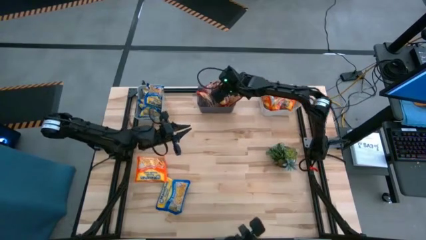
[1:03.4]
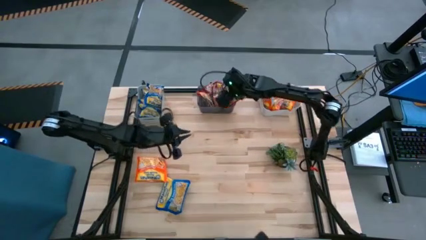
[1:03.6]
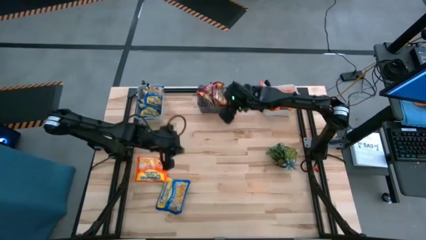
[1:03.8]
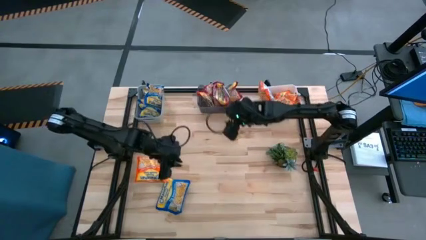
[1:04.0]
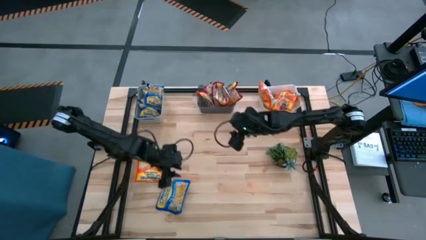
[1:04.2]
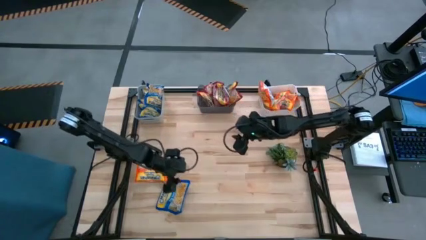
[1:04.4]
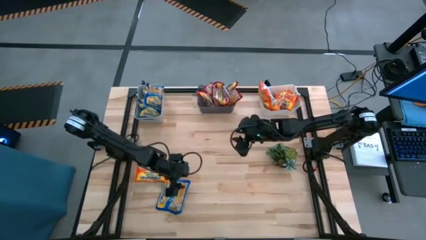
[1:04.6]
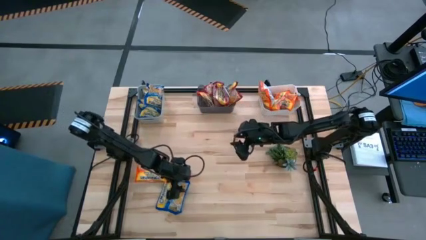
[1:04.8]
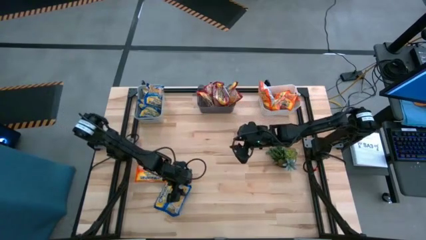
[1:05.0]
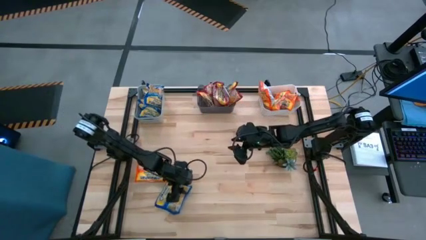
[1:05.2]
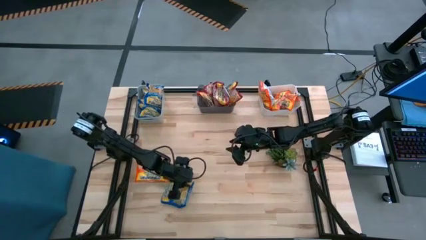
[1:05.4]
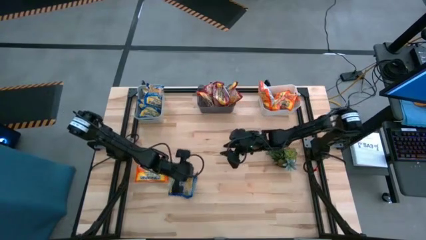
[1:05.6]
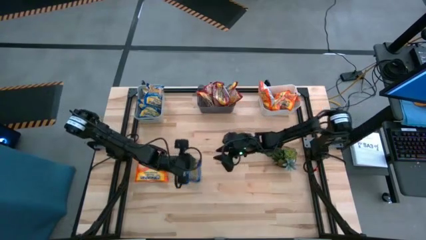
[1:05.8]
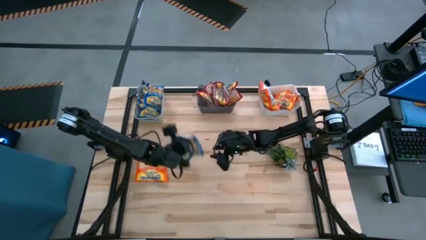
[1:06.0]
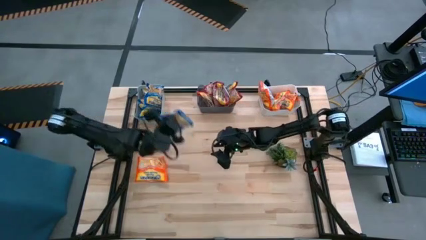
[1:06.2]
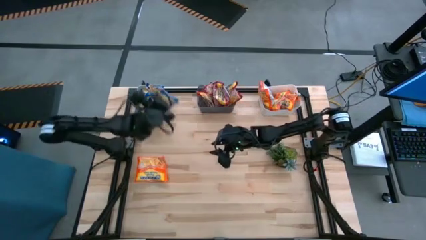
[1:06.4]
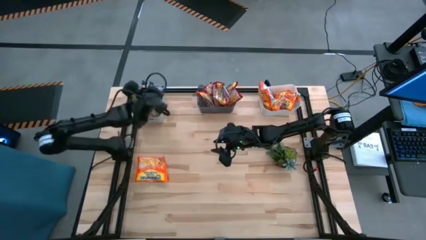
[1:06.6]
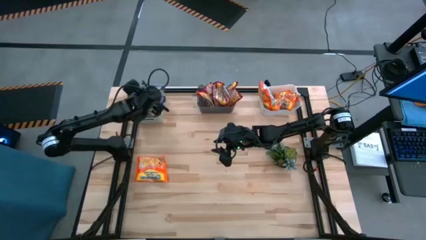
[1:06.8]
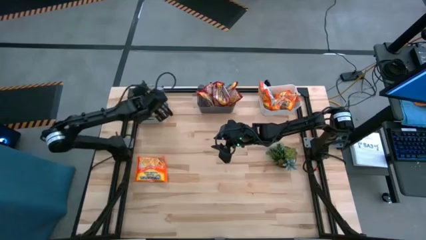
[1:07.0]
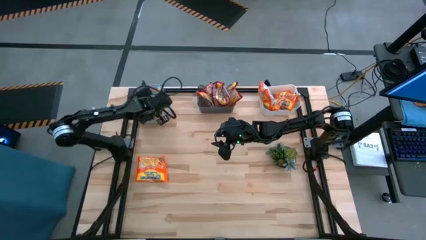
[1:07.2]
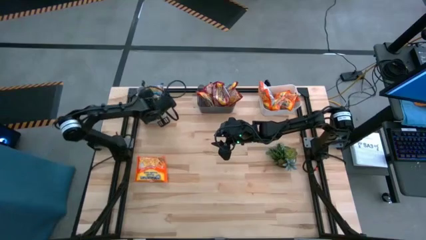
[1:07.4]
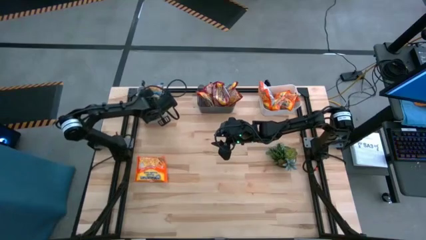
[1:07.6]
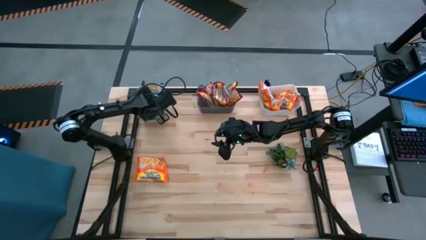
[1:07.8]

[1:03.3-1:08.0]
Task: Sort Maruchan noodles
Put the blue noodle pack into the gray bin

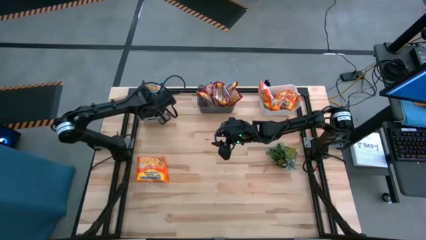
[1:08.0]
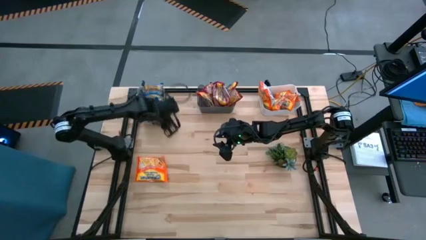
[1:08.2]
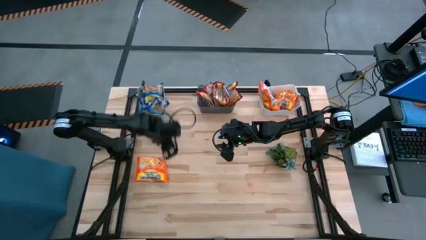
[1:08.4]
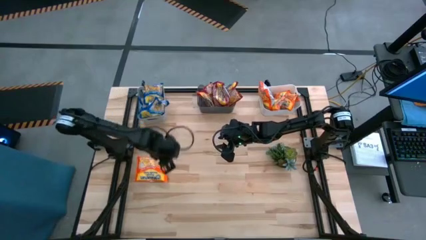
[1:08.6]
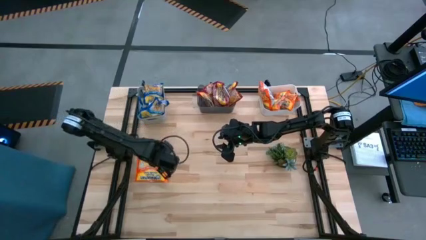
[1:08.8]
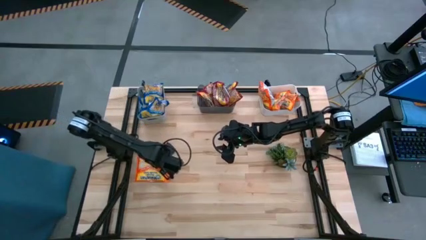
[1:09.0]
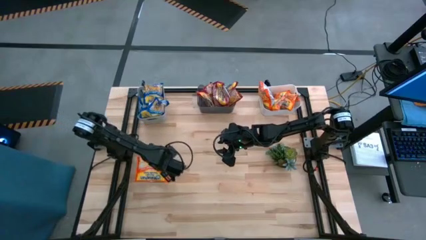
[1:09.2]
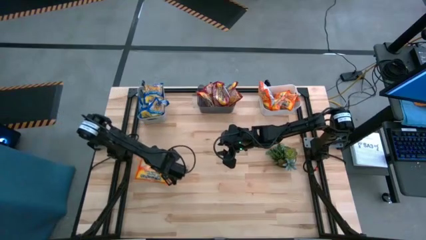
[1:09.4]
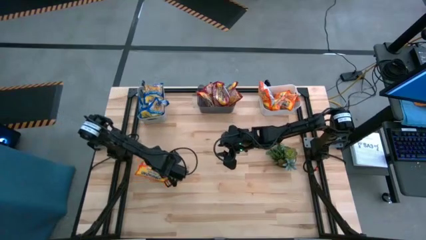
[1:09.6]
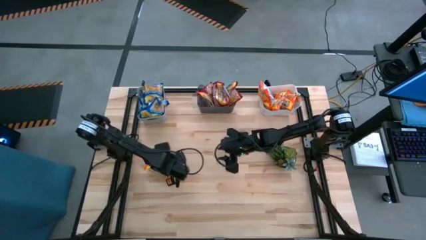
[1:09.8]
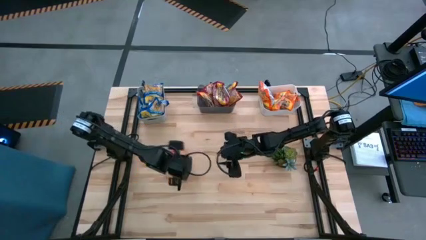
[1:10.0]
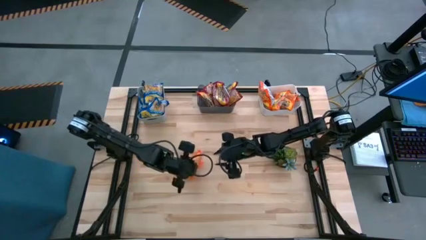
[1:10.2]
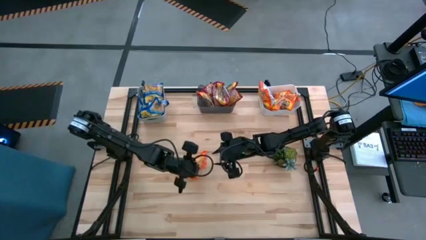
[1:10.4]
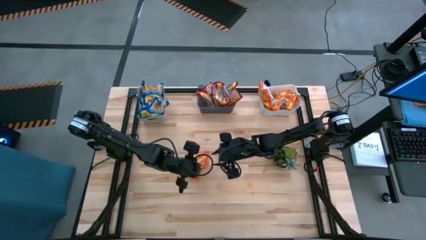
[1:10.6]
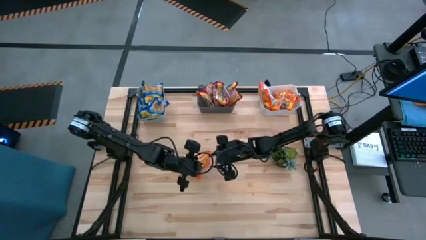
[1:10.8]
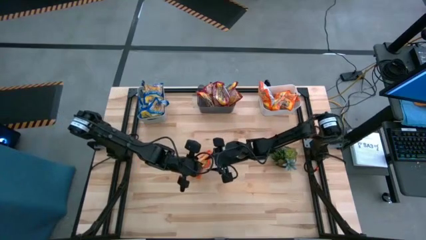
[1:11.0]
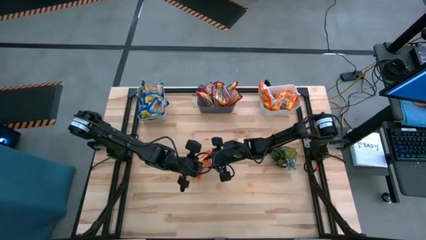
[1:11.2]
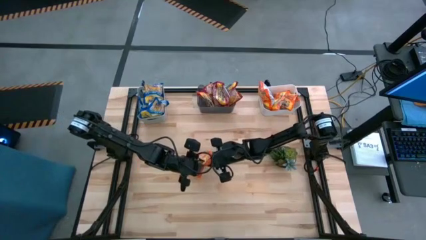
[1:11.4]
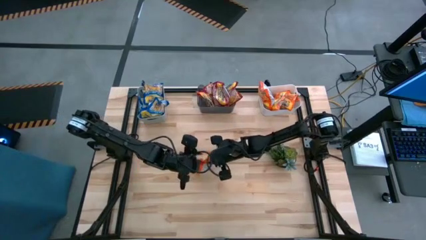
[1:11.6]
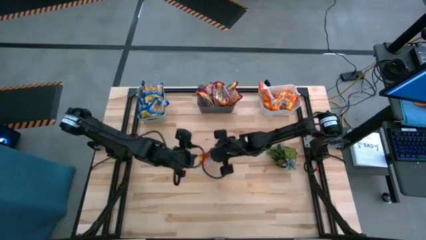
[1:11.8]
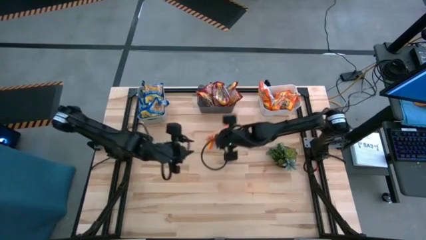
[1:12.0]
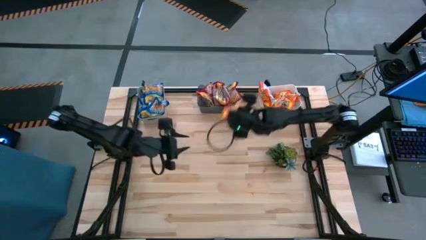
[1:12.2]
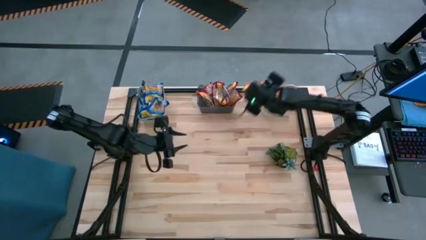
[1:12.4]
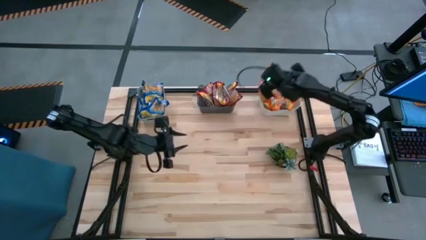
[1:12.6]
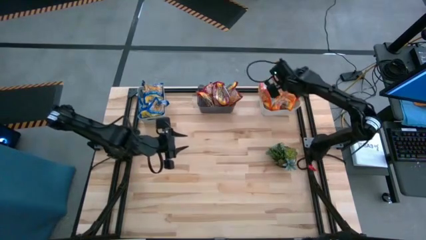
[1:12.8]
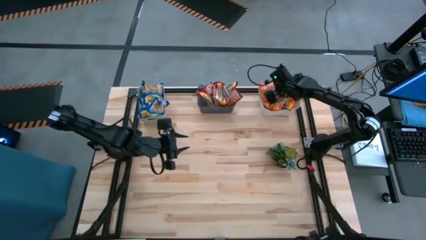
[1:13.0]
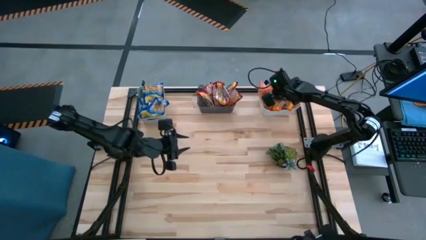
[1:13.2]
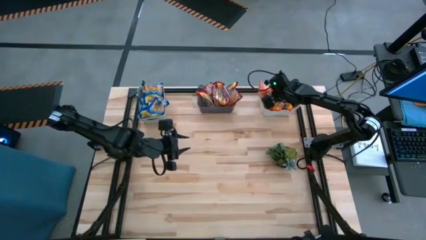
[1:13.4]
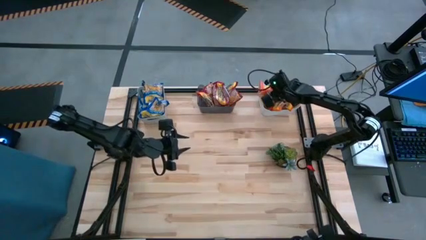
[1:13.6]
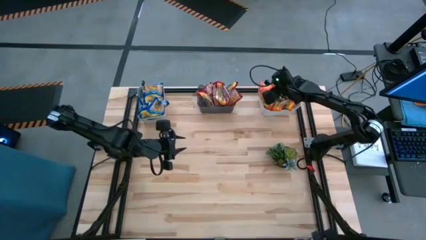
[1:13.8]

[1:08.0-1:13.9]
Put the orange noodle pack into the white bin

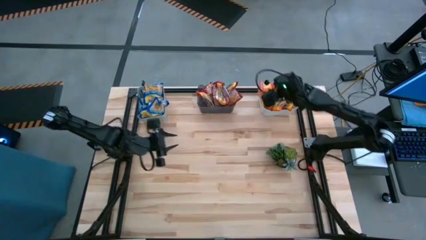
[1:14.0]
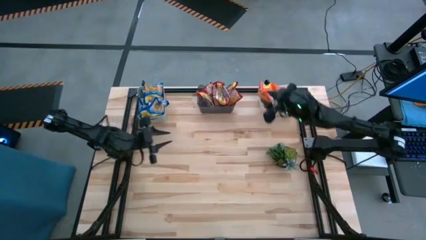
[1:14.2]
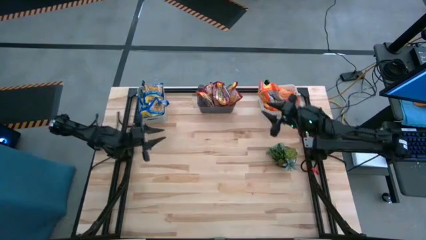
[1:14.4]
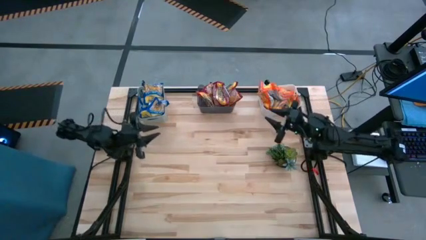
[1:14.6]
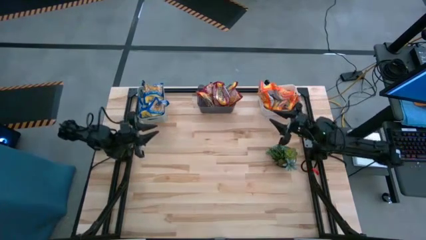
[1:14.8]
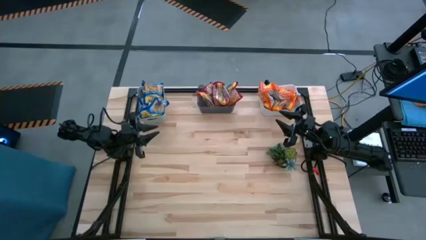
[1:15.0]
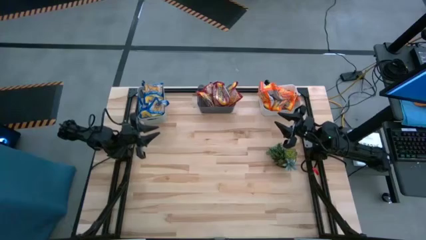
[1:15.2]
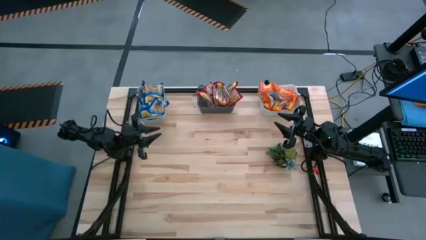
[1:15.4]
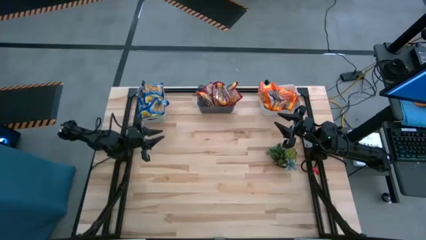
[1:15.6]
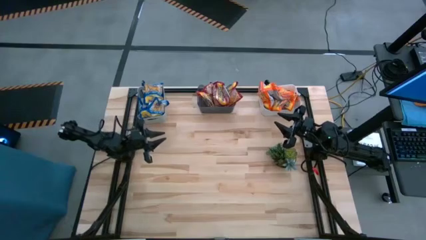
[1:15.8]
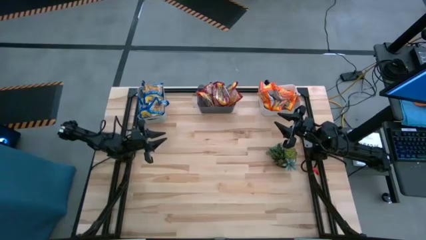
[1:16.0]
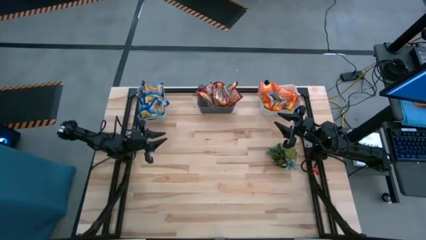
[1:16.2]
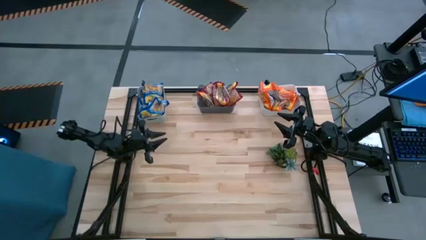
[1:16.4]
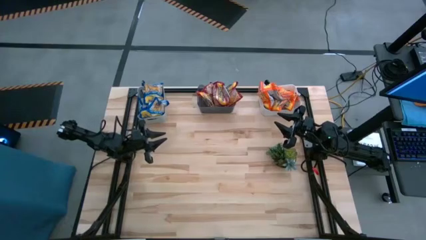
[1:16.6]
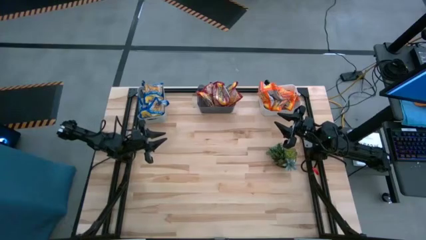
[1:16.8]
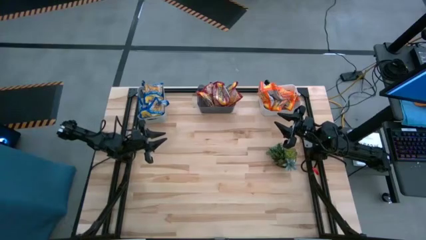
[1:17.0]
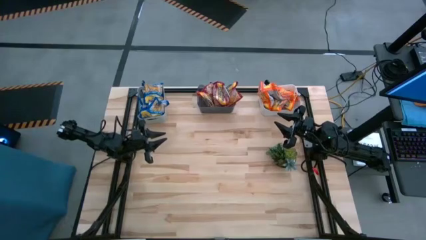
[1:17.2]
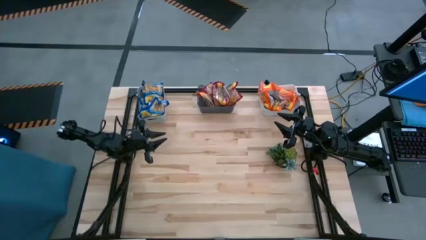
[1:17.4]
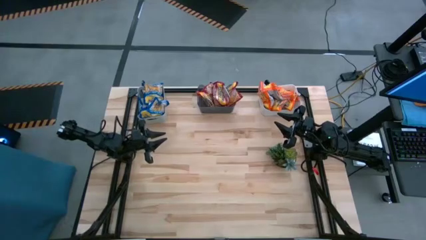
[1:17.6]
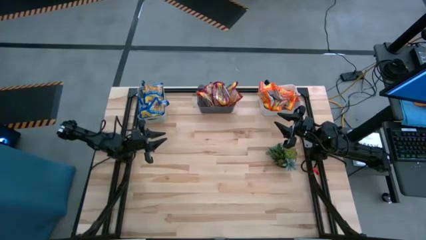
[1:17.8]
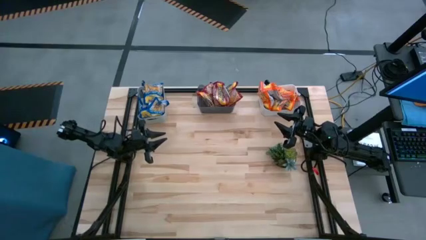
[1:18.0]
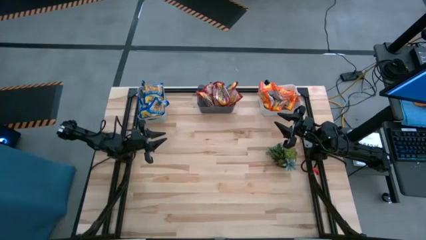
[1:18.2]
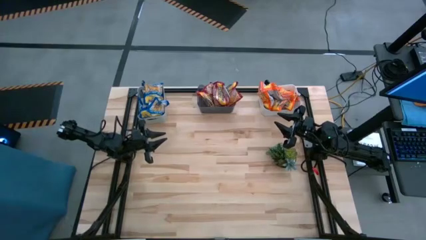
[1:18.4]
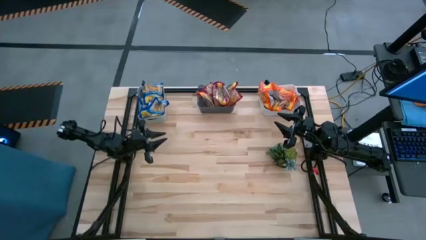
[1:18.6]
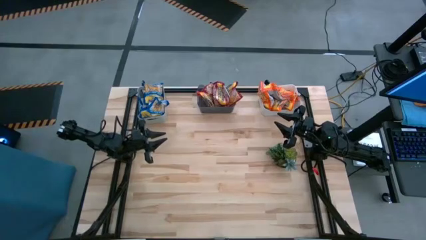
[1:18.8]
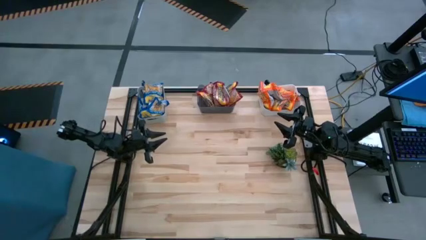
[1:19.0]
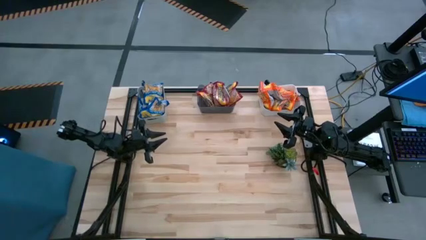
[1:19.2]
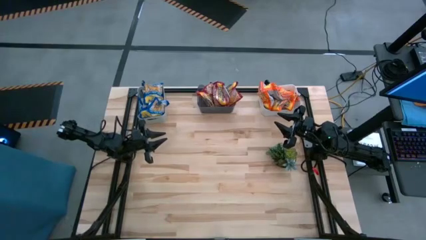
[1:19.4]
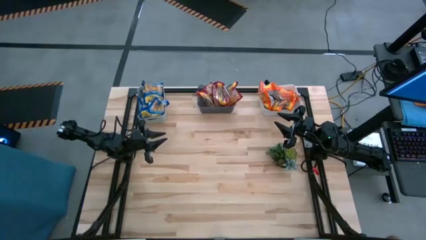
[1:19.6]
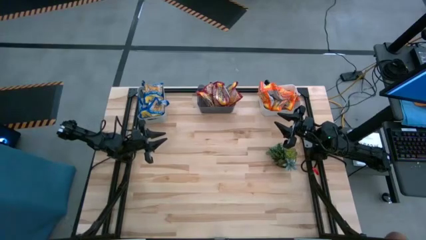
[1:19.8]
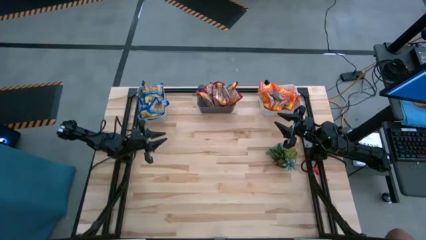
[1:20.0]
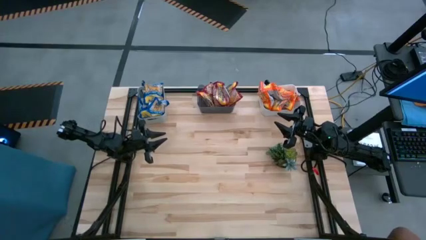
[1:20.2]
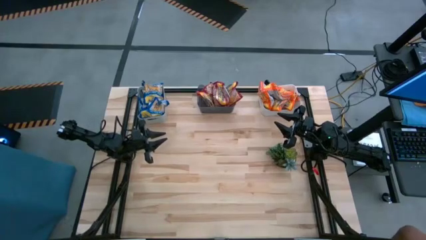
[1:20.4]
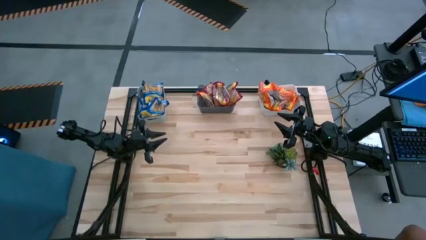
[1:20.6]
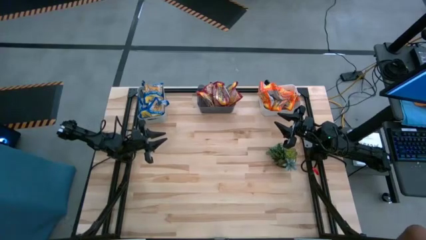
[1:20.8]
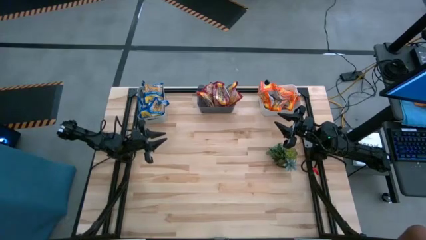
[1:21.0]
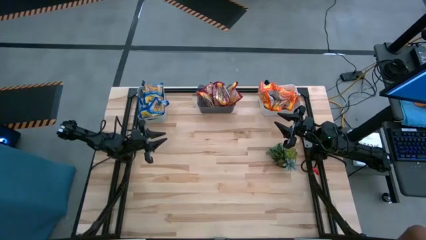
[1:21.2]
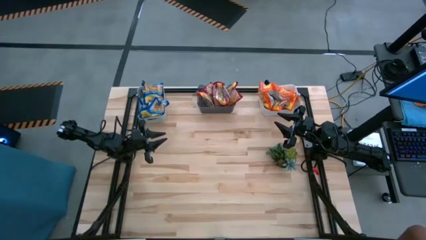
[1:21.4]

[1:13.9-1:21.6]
Return to Home Position
